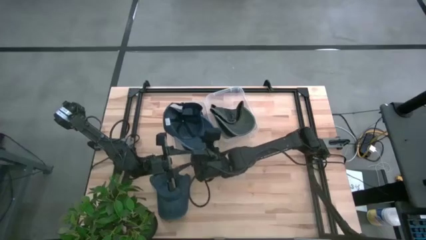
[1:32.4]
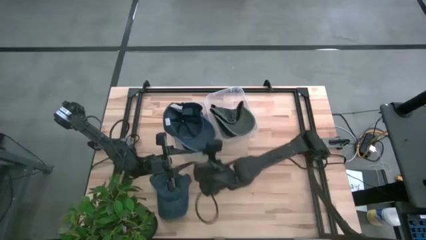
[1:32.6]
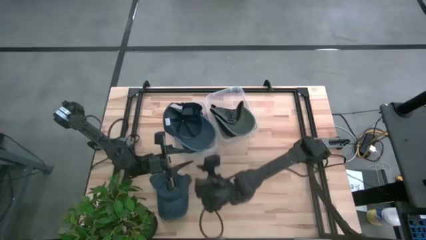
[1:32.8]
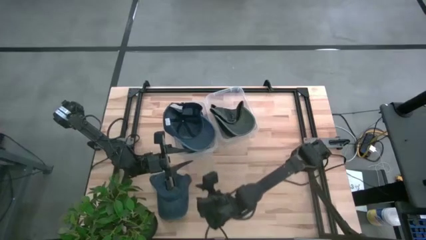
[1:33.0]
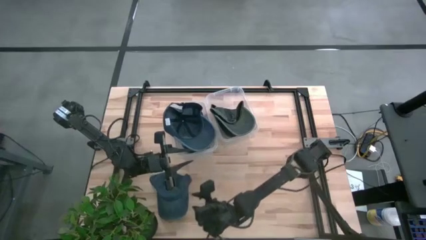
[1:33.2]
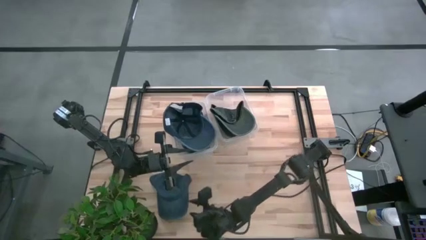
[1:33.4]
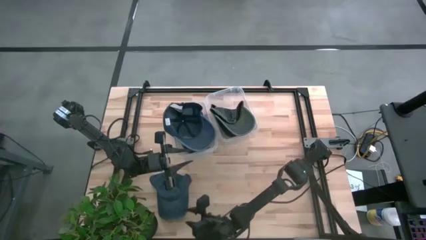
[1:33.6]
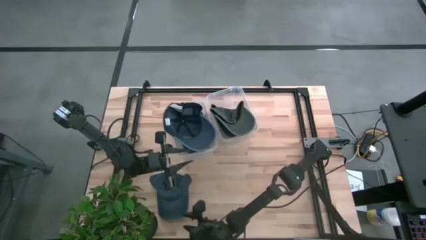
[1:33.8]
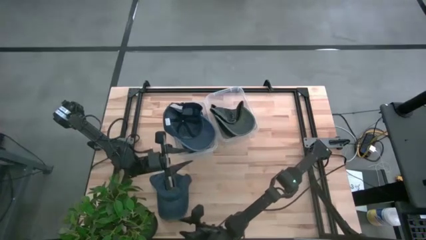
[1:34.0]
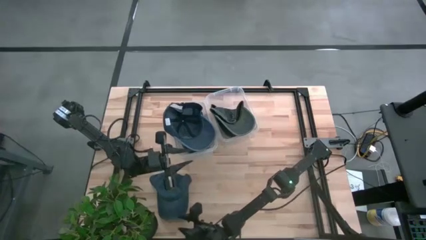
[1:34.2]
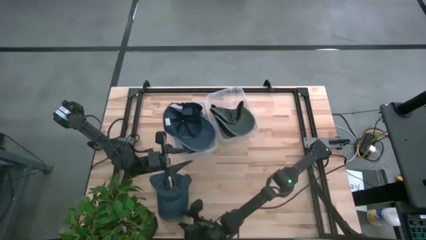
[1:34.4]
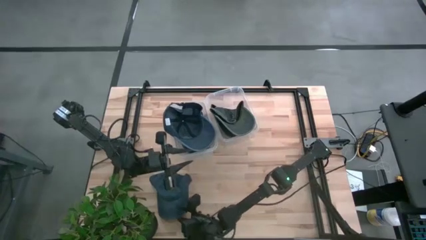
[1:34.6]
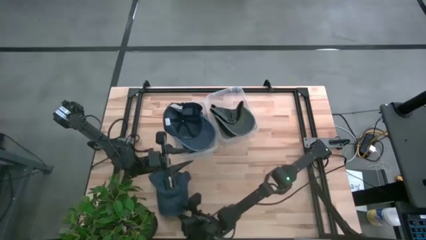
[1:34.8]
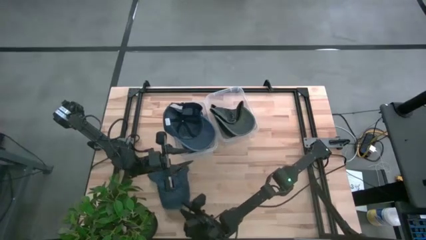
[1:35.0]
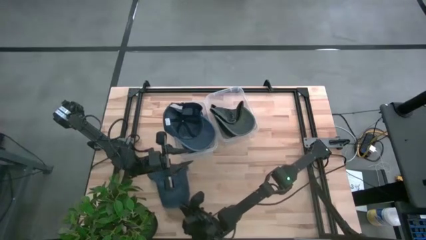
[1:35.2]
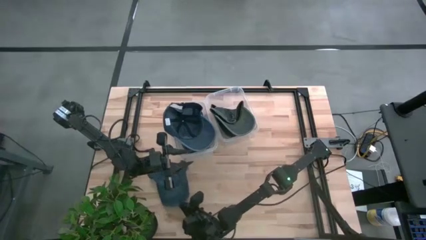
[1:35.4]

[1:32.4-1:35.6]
Task: Pick & Place hat
Put the dark blue cap into the left transparent bin

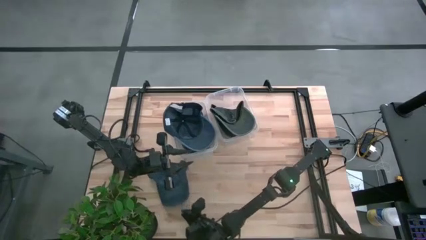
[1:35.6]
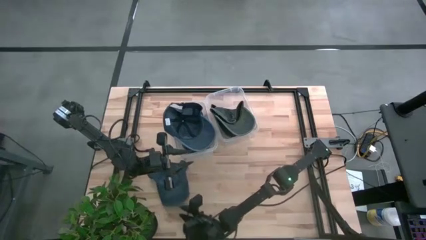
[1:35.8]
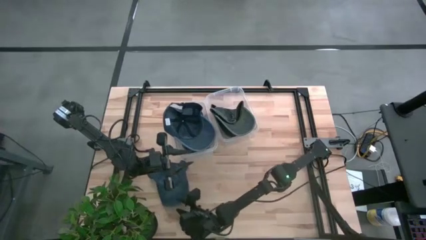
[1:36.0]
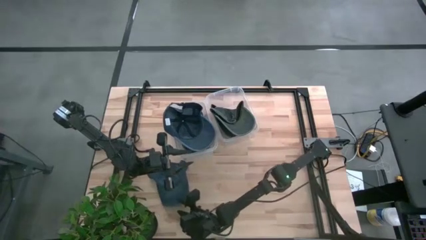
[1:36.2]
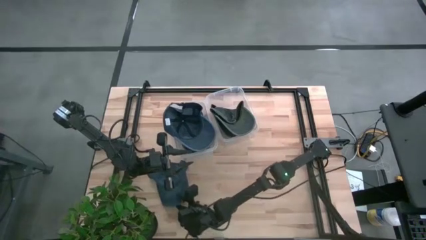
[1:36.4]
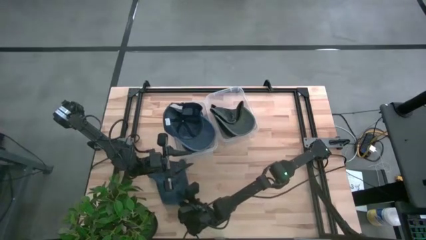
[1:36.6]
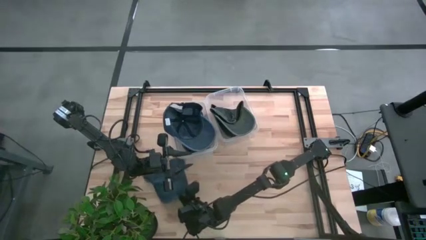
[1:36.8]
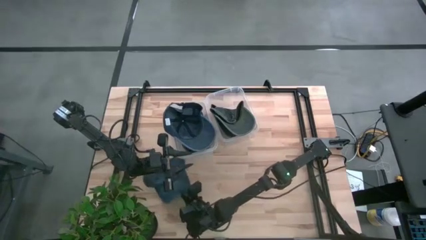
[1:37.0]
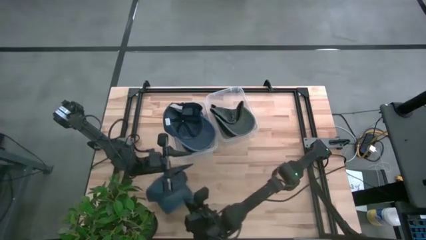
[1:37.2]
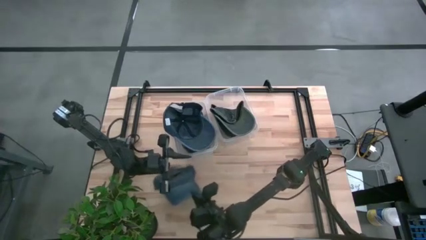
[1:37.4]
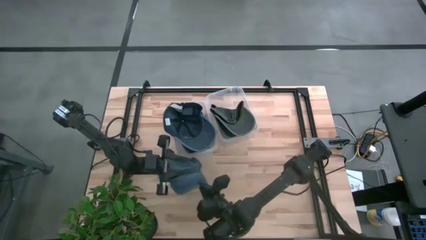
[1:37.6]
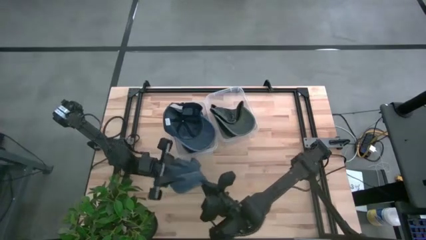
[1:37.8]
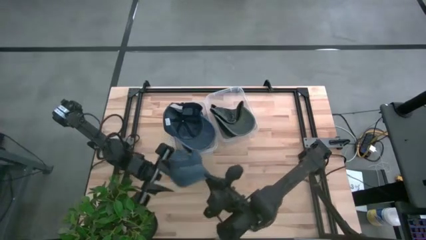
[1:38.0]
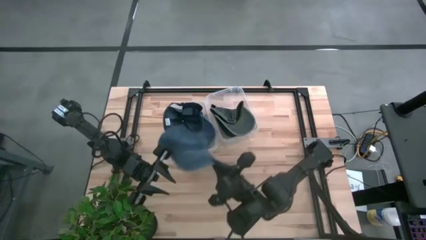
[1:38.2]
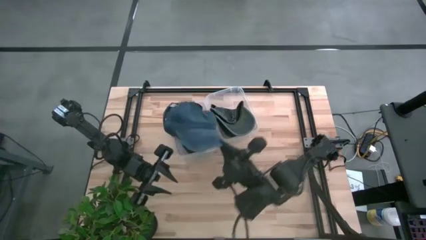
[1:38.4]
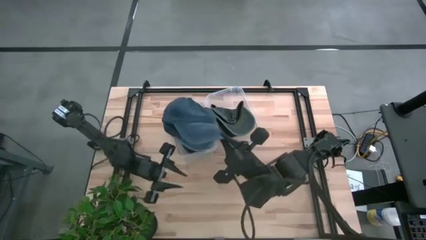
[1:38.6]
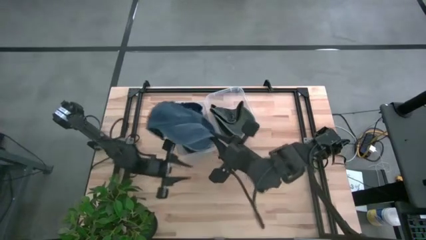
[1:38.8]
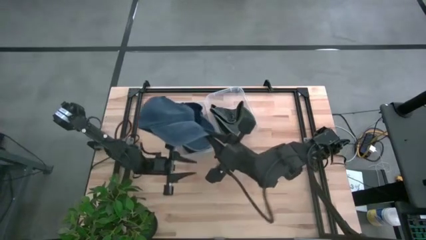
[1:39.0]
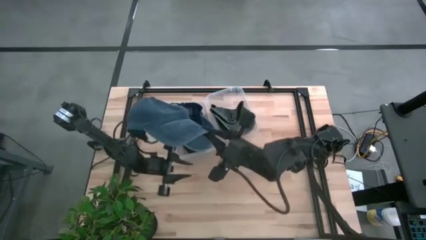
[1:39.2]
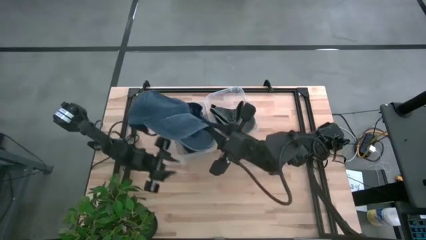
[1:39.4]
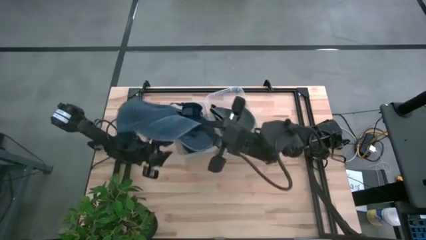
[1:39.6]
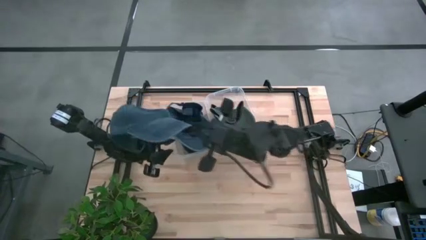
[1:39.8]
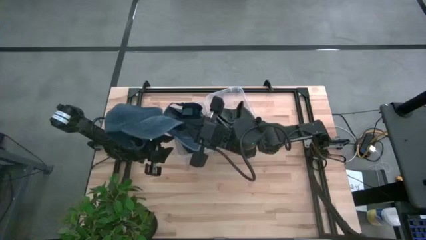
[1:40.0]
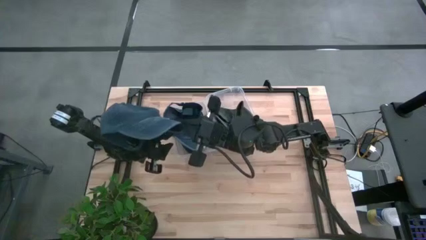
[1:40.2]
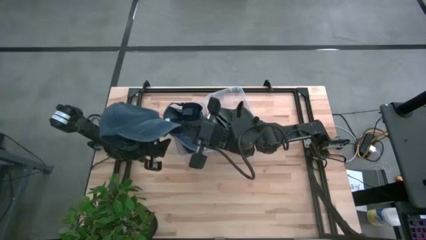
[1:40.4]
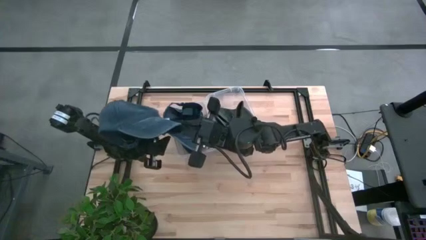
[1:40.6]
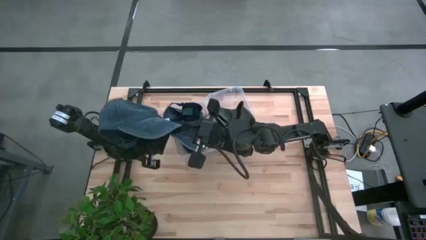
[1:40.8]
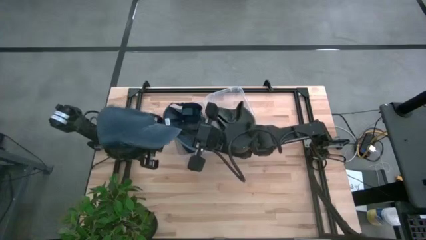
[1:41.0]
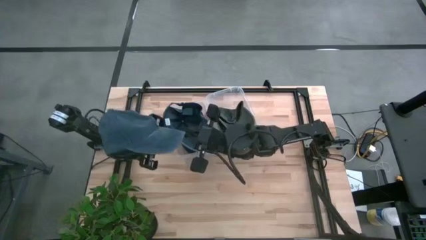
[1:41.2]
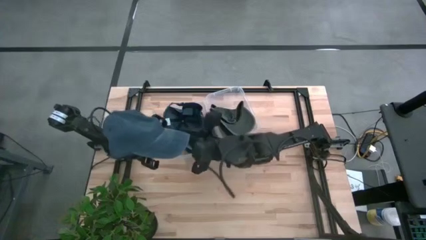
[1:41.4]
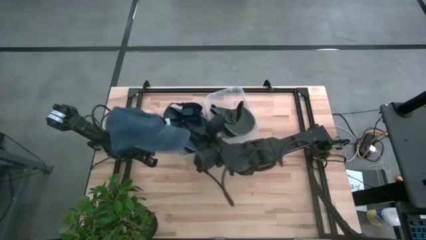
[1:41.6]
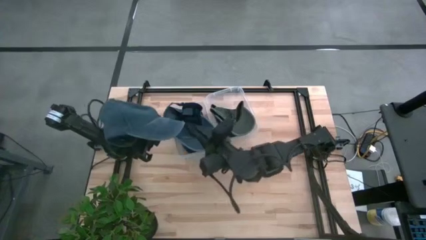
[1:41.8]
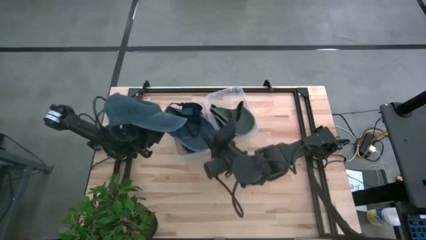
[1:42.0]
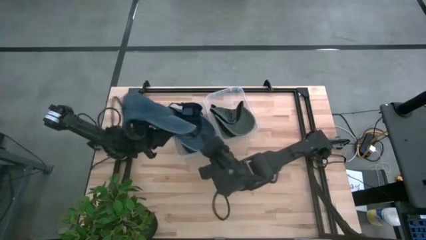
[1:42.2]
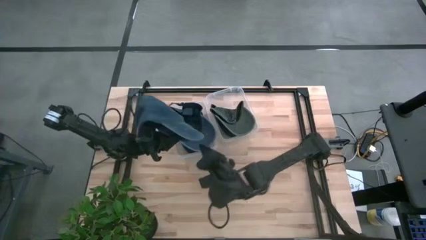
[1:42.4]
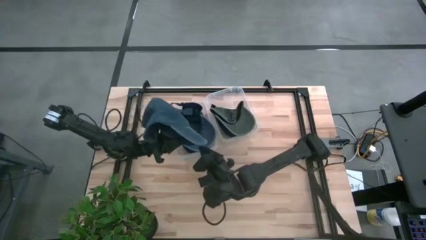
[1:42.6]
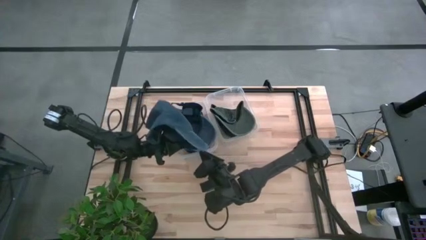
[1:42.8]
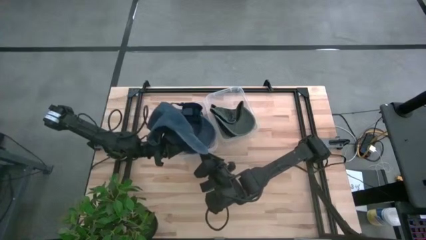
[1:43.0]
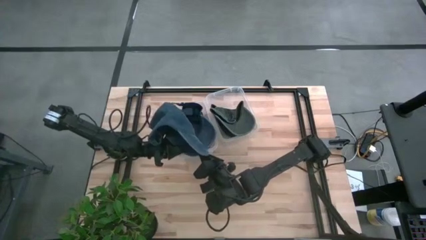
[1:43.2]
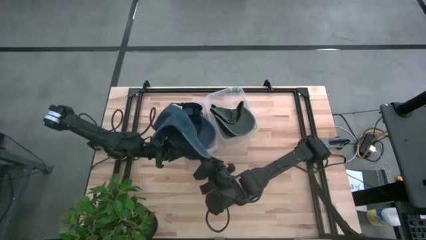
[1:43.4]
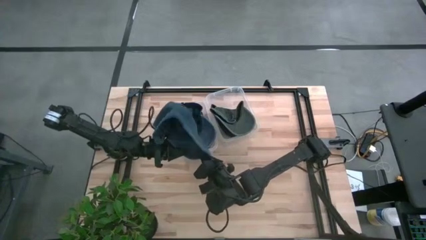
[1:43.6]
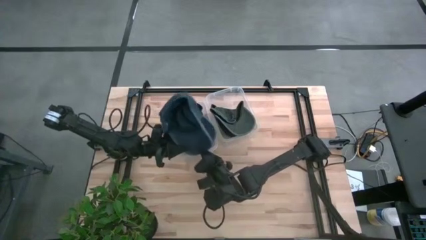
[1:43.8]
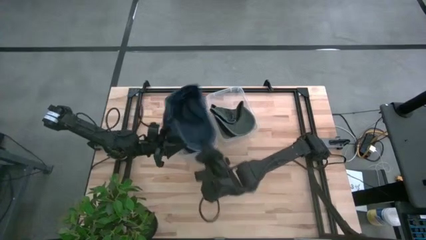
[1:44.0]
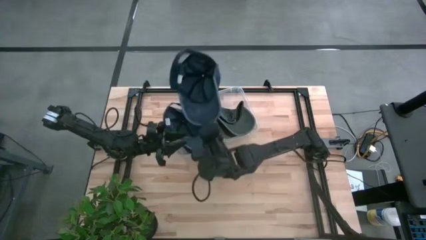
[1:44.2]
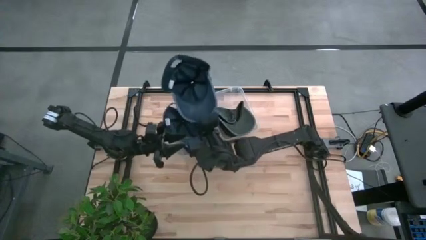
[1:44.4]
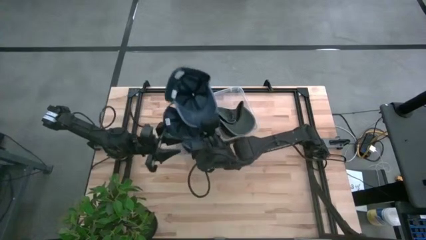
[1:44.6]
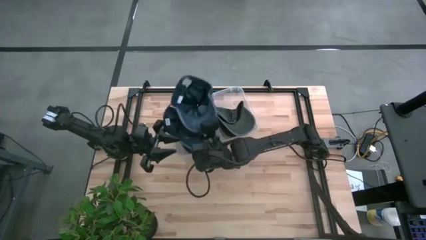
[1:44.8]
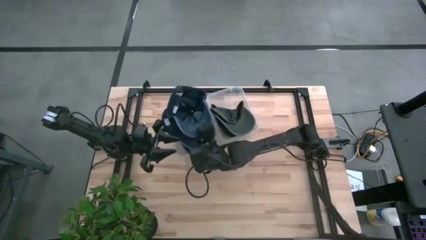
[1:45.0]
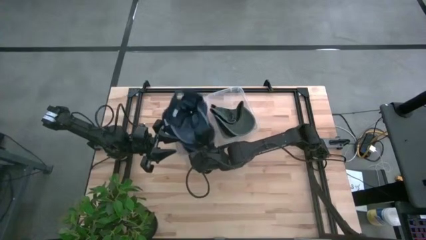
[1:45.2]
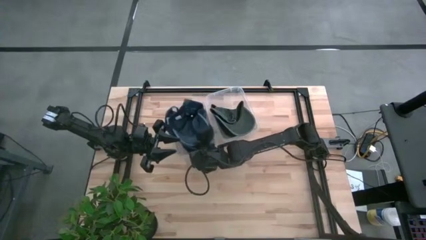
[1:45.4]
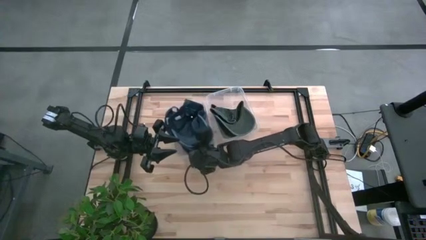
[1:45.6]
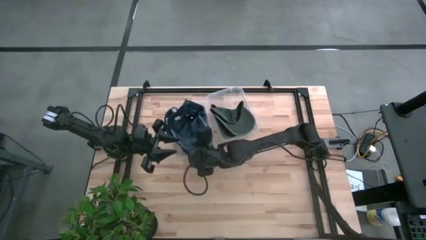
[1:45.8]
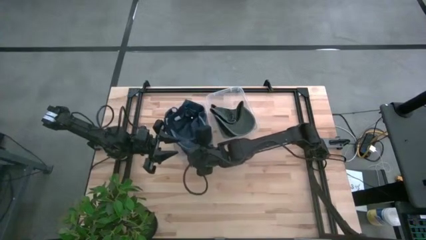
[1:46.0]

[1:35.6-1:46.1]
Put the dark blue cap into the left transparent bin
